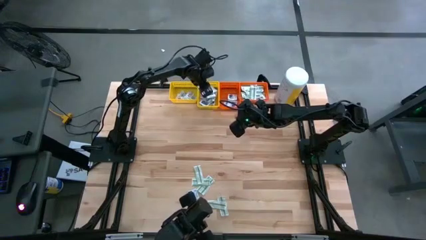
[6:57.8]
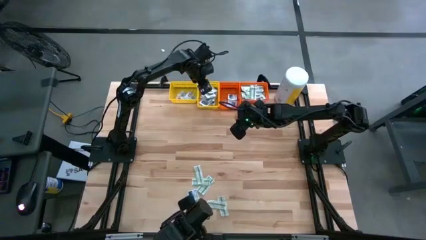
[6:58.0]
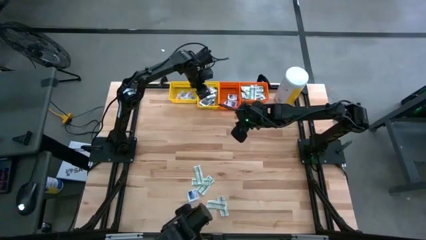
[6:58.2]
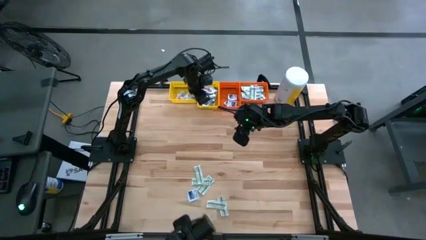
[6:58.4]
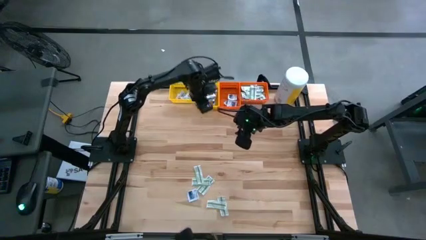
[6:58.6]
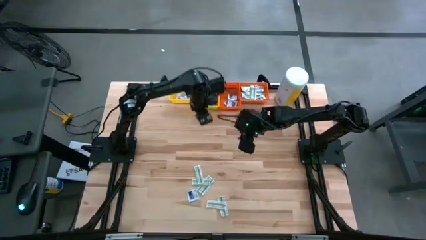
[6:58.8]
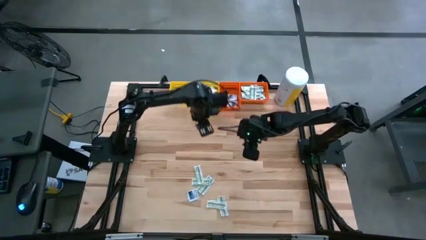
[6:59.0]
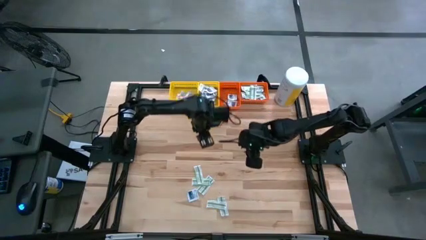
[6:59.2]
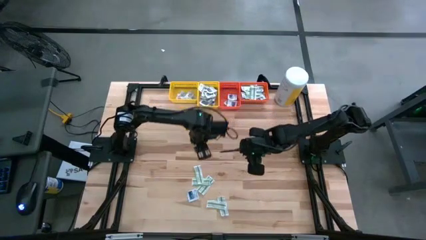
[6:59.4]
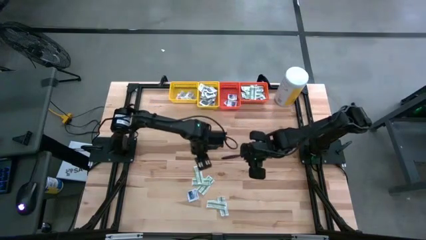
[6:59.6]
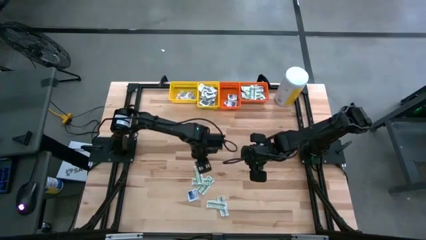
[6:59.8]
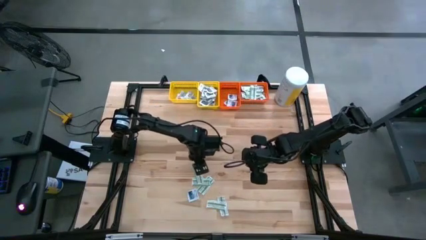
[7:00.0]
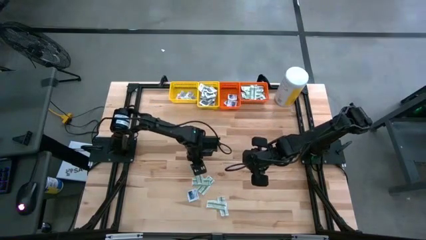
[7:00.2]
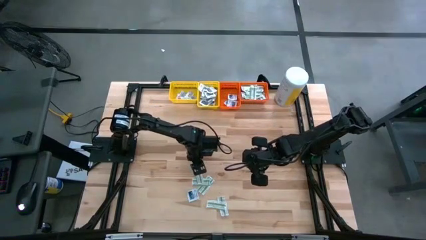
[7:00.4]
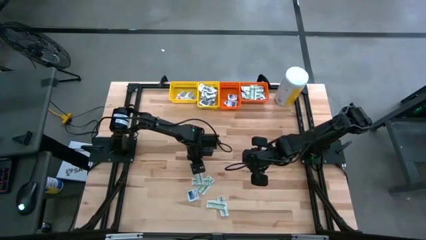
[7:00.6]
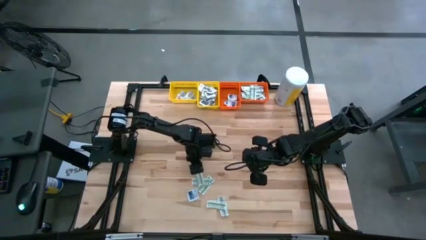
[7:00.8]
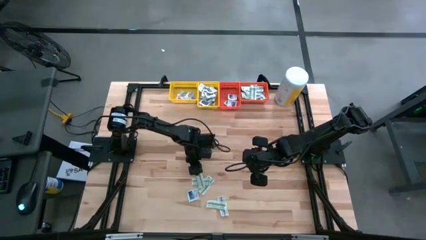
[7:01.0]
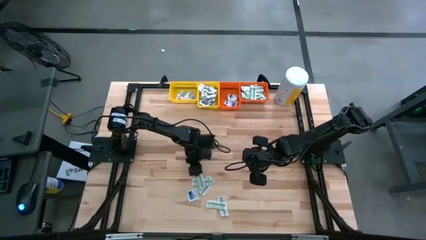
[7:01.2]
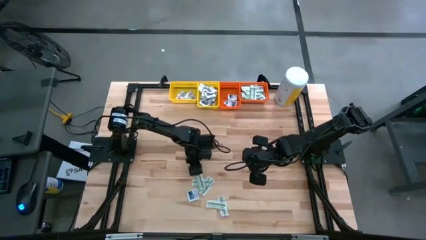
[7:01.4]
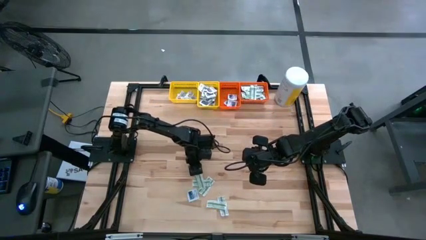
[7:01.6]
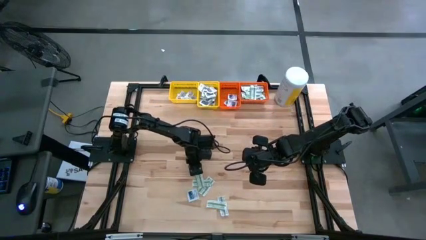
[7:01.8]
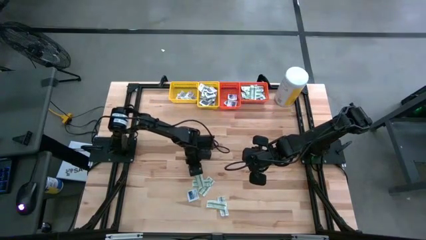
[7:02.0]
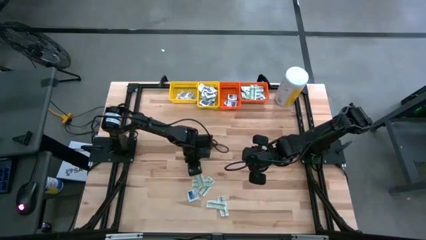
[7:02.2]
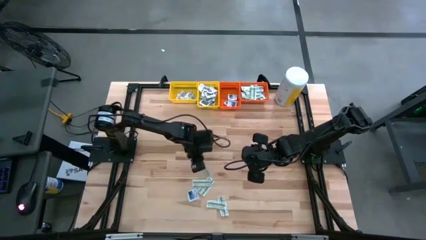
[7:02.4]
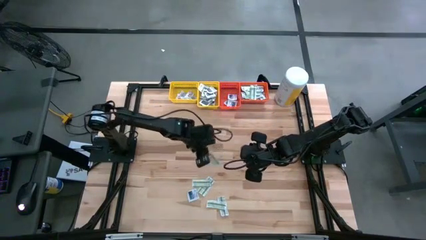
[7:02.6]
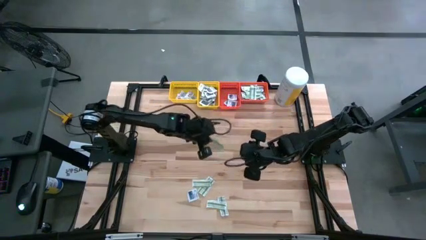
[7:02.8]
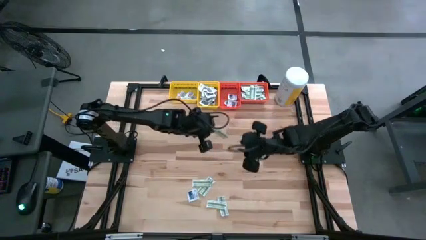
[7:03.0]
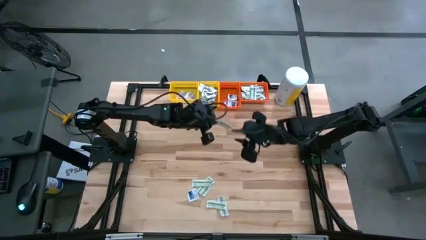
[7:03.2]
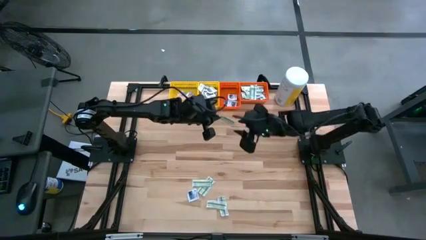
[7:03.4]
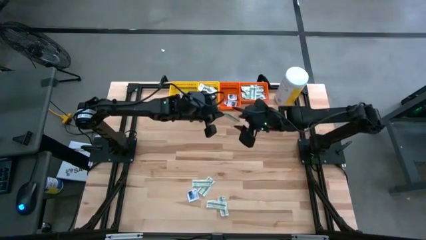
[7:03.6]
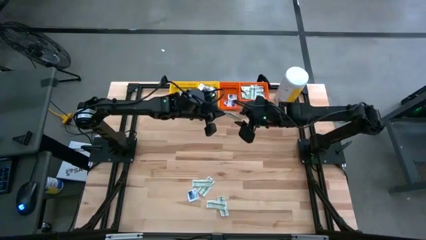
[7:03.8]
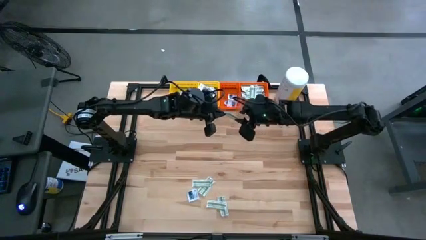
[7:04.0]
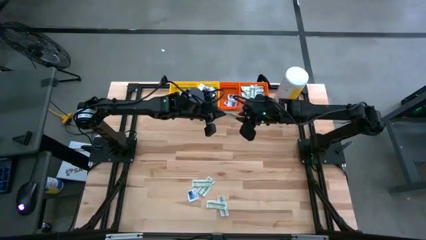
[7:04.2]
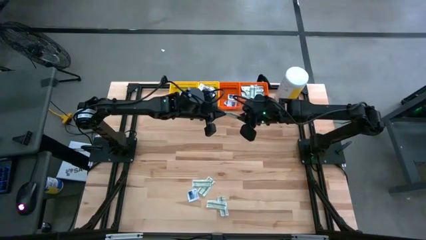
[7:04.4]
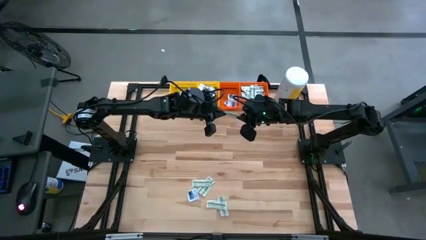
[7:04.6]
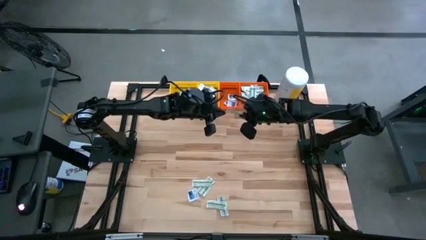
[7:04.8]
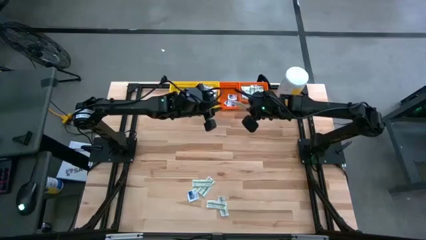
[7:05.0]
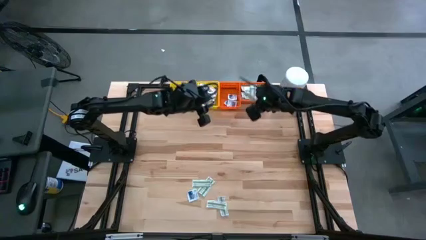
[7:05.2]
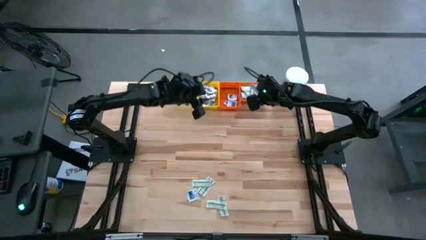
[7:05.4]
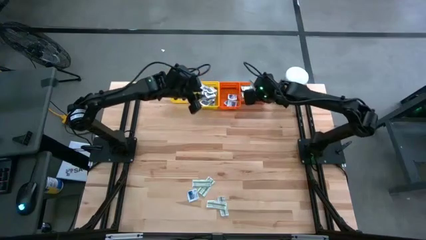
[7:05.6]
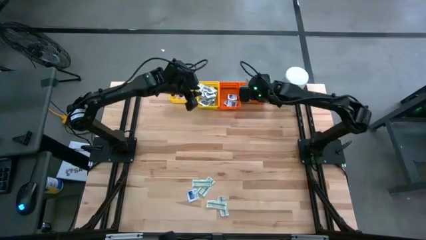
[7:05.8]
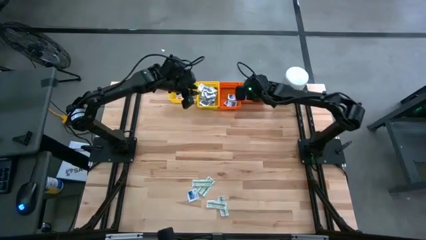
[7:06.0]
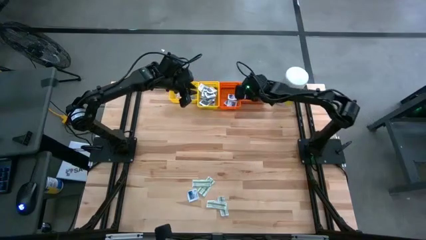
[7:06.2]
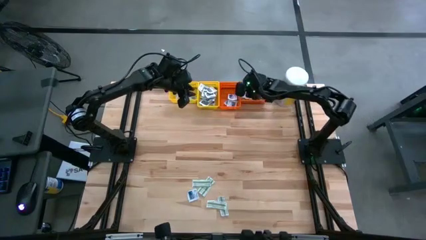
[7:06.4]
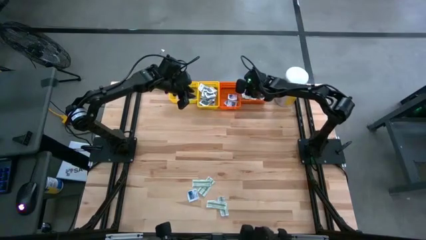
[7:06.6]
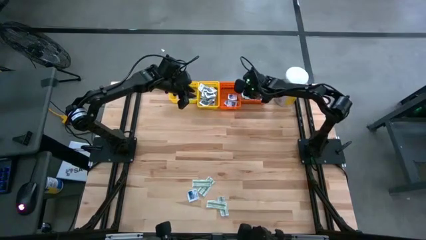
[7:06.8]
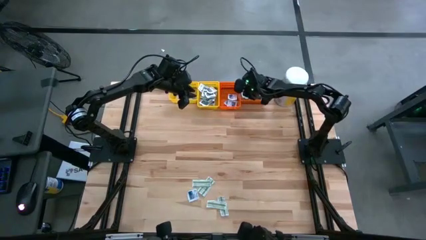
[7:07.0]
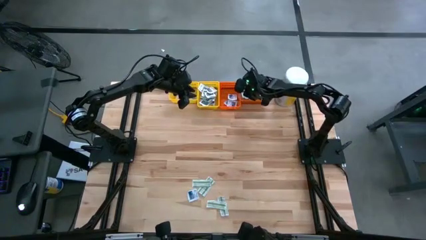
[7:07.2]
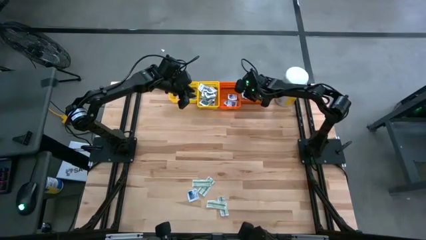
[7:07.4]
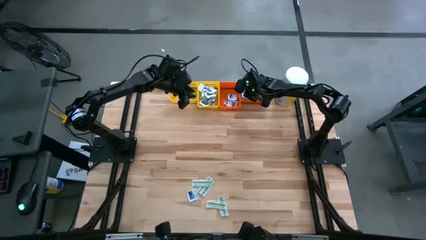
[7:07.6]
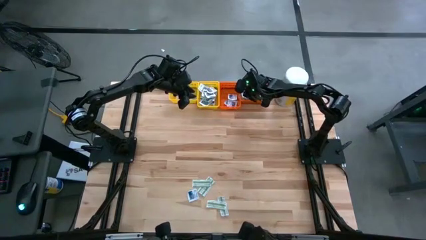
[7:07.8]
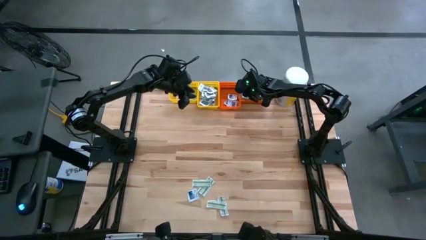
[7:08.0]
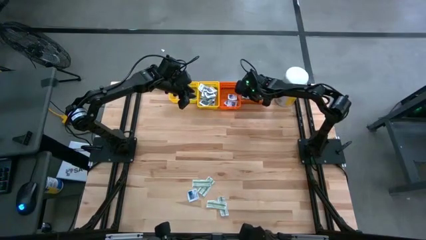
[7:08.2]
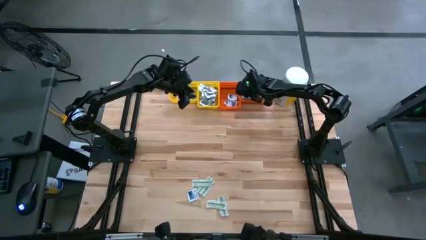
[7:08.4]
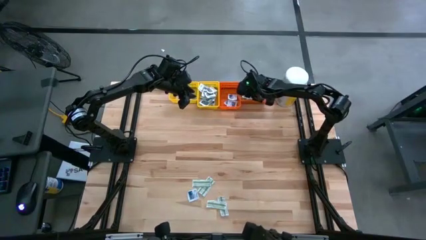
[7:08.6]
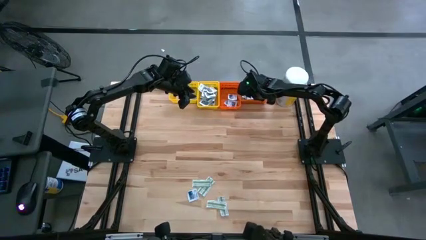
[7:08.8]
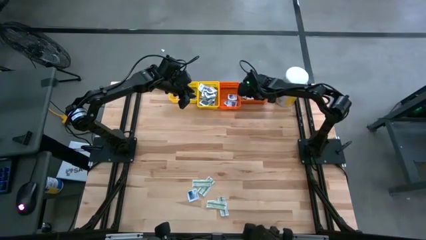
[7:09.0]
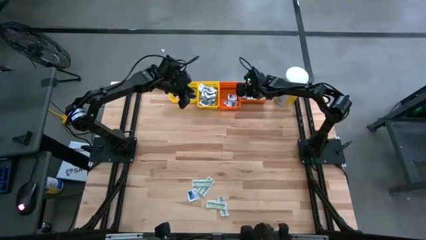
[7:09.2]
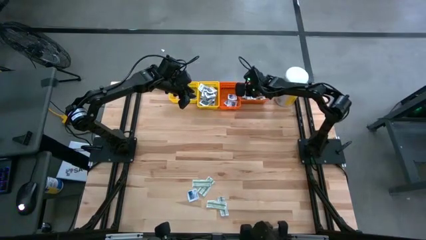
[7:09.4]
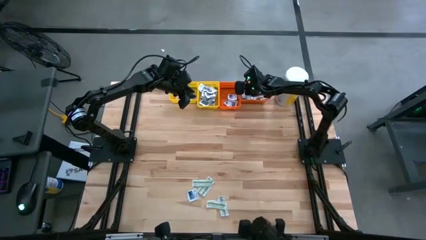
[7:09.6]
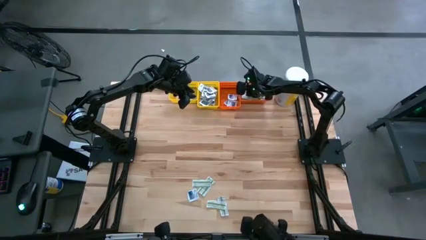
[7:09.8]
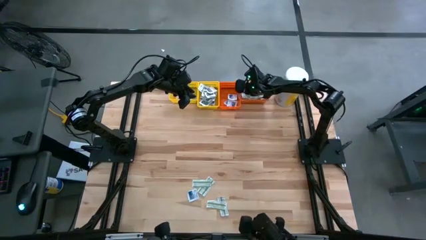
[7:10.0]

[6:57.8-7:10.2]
Task: Pick & Place First Aid Supplies
Put the green pad into the right orange bin

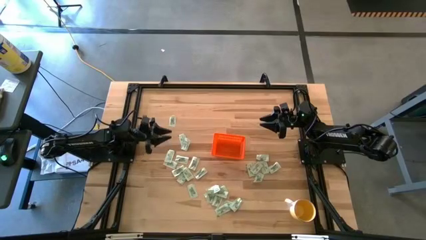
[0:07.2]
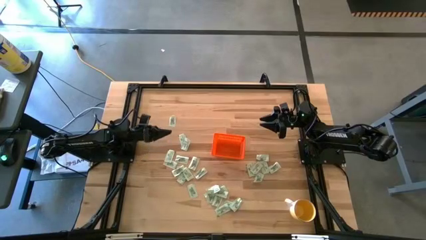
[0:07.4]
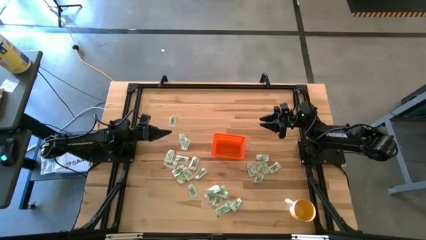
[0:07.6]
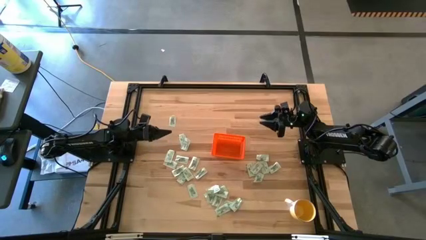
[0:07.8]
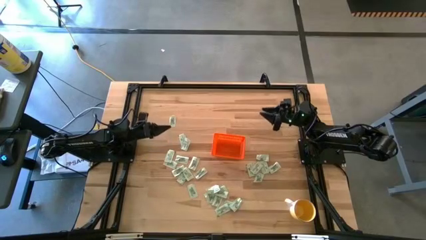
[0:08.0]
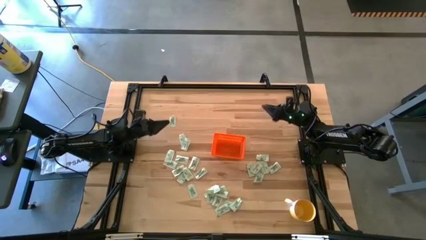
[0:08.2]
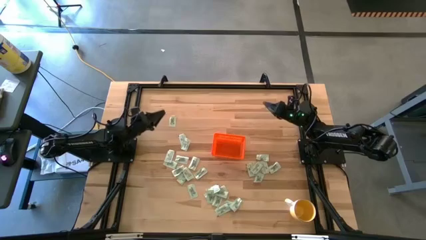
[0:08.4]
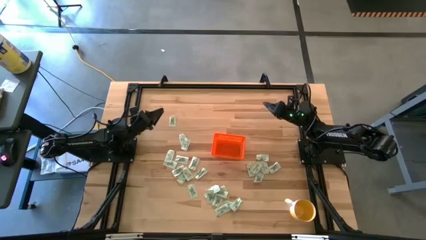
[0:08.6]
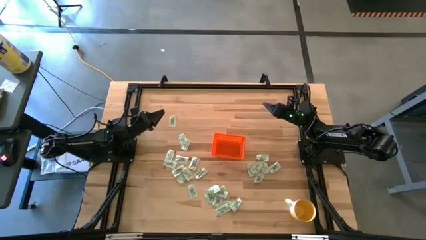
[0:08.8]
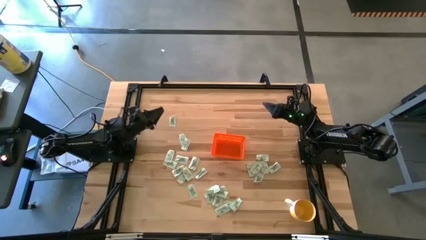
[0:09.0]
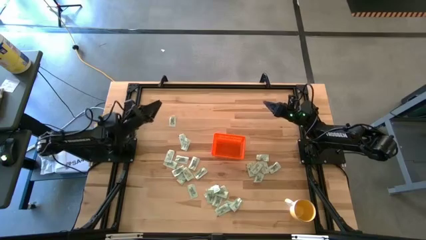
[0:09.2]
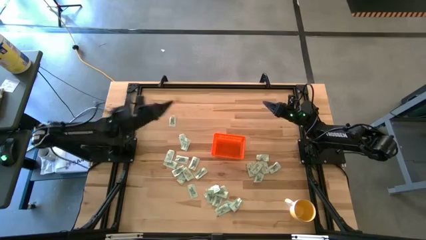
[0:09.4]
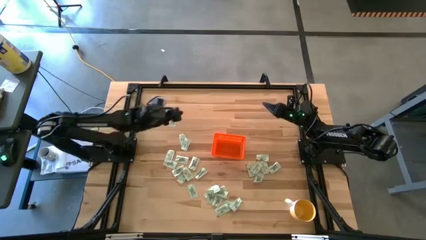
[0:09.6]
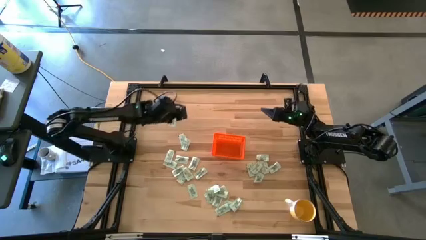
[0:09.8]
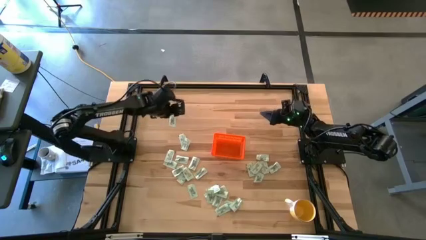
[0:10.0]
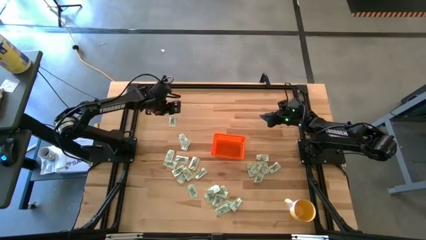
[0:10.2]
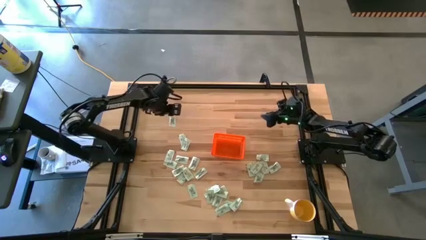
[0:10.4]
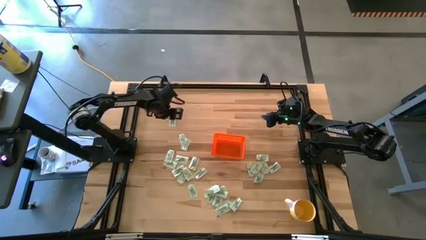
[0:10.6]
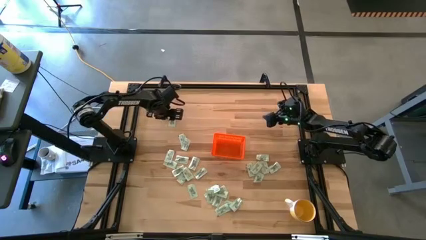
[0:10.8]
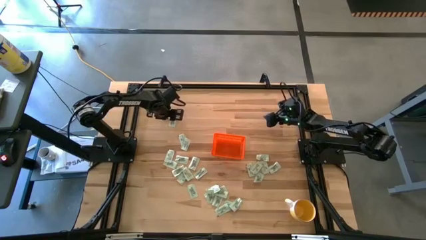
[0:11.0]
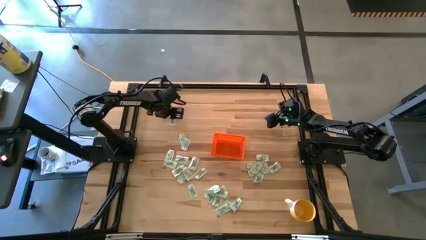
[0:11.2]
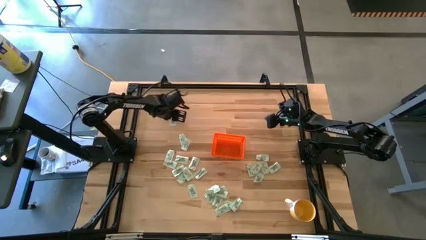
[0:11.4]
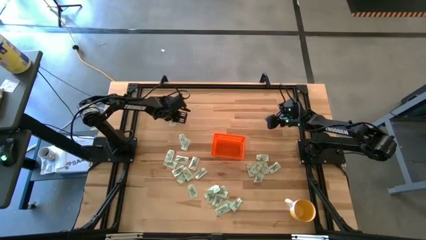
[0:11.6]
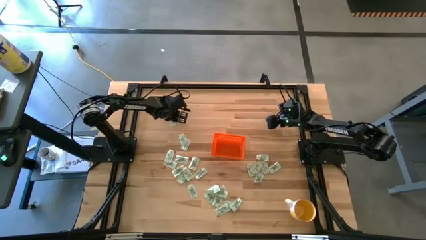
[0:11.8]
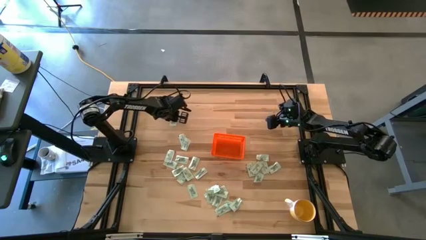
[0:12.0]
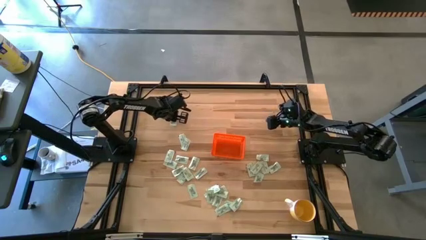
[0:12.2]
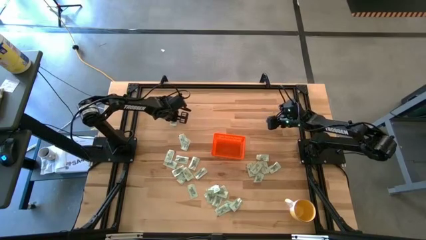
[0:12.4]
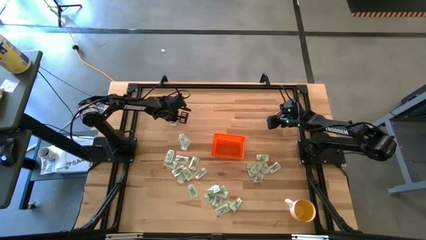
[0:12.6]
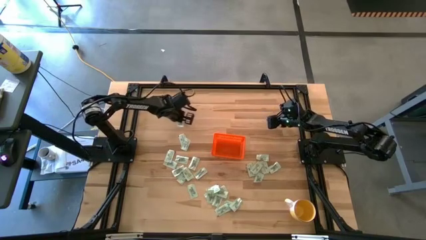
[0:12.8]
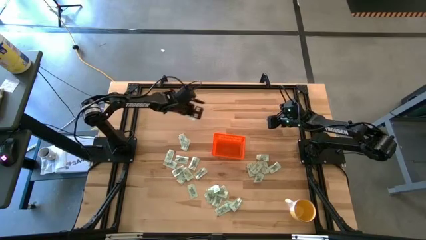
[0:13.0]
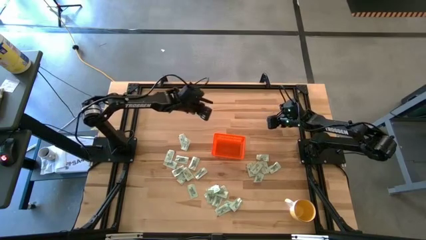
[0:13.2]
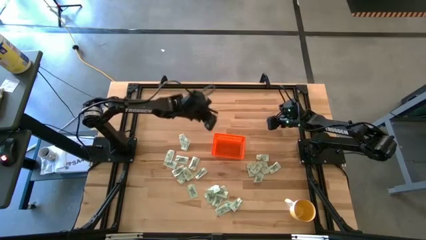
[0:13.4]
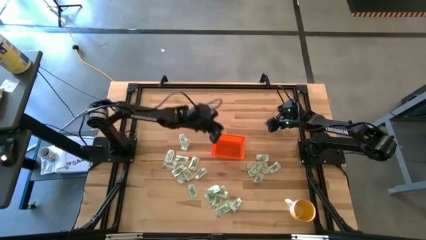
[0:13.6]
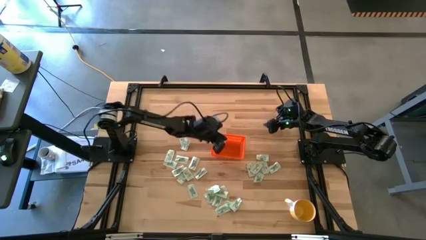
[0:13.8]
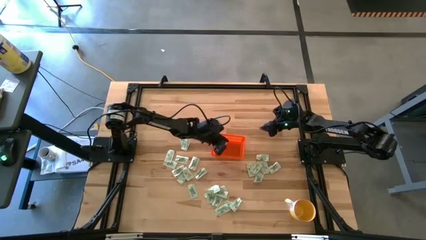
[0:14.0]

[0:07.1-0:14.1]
Task: Pick and place Stevia / Truvia into bins
Put the white stevia packet into the orange bin
